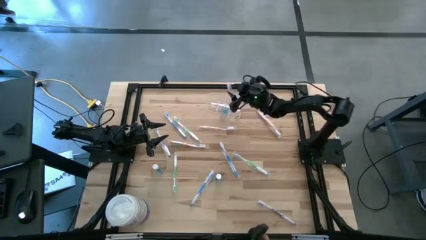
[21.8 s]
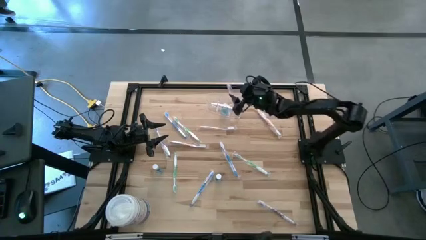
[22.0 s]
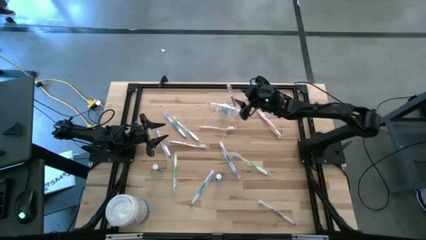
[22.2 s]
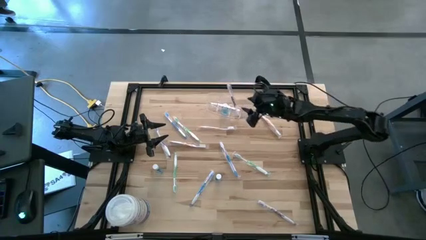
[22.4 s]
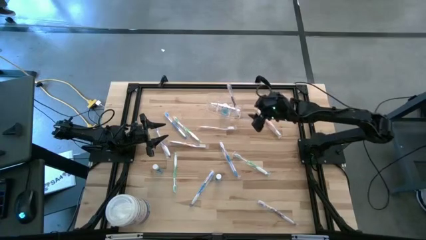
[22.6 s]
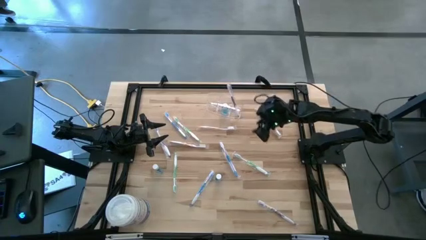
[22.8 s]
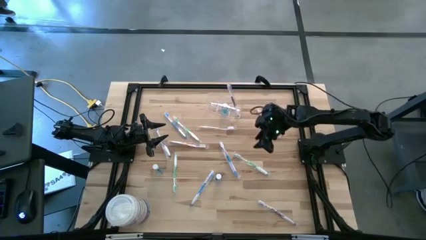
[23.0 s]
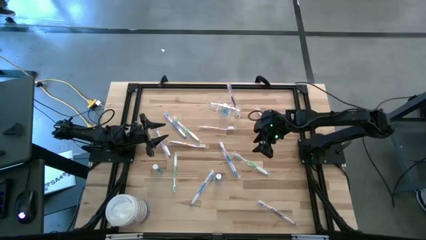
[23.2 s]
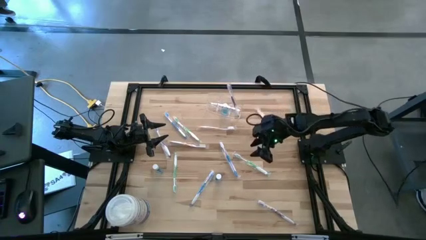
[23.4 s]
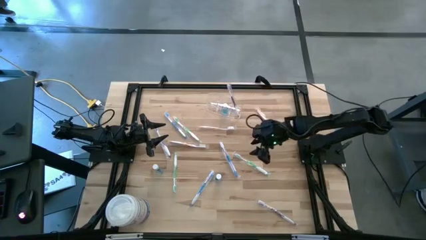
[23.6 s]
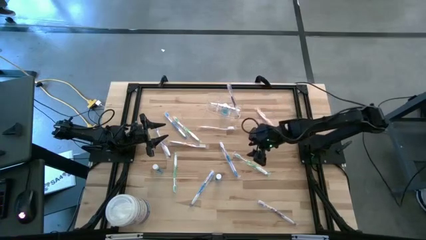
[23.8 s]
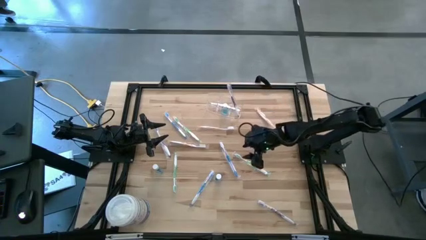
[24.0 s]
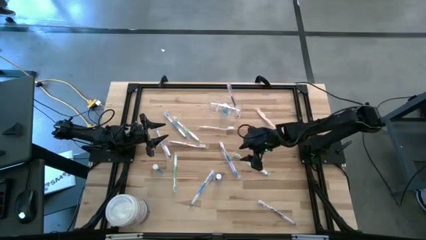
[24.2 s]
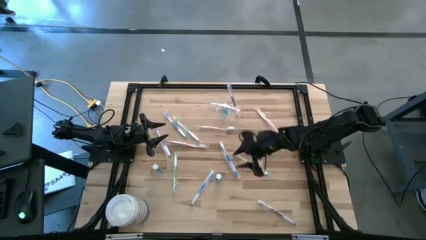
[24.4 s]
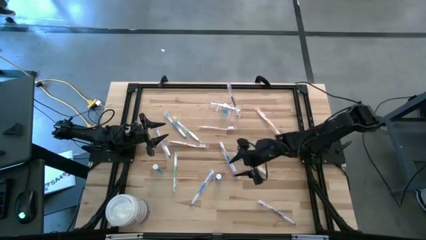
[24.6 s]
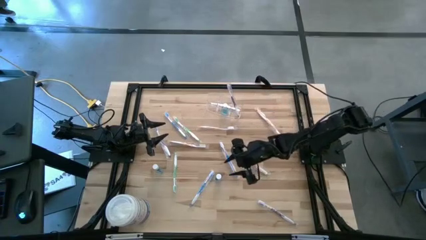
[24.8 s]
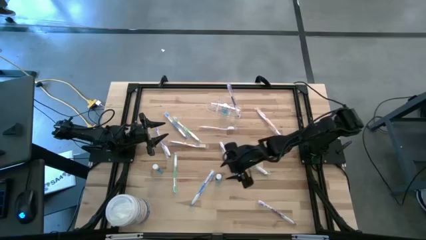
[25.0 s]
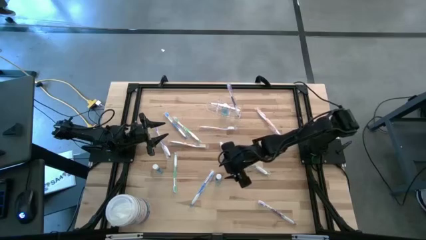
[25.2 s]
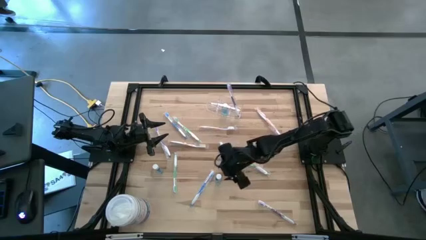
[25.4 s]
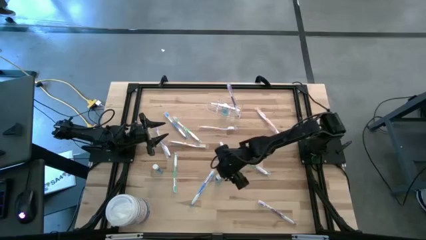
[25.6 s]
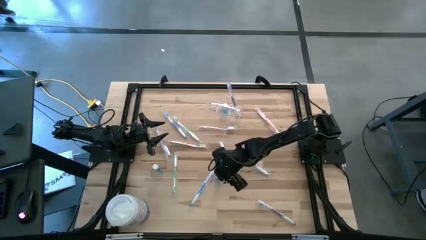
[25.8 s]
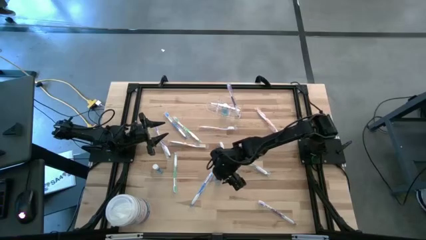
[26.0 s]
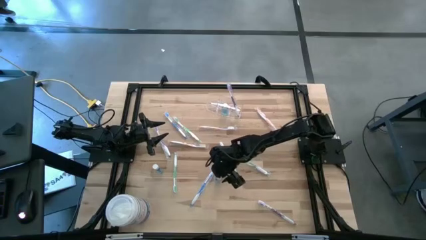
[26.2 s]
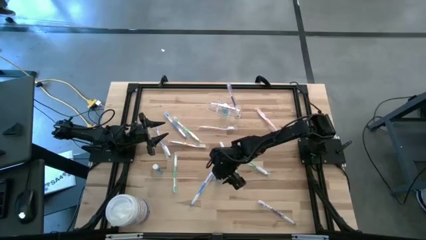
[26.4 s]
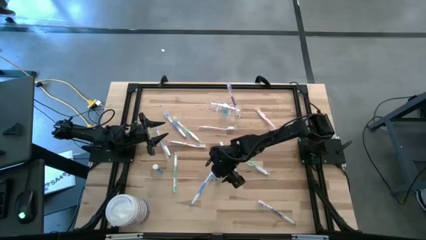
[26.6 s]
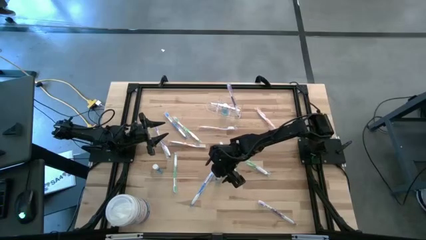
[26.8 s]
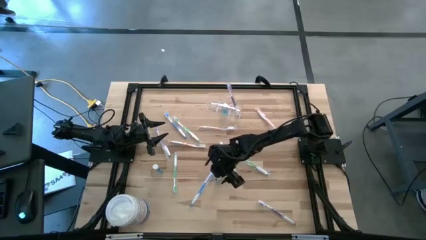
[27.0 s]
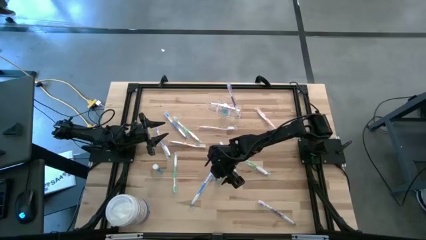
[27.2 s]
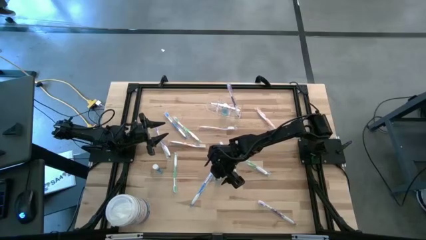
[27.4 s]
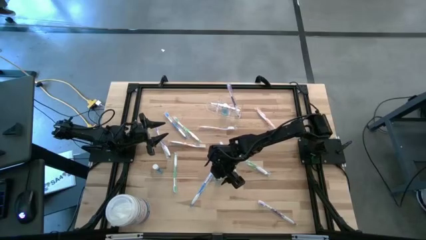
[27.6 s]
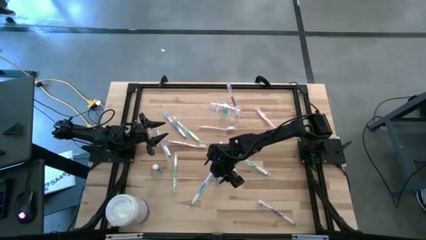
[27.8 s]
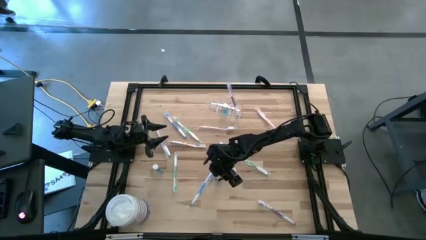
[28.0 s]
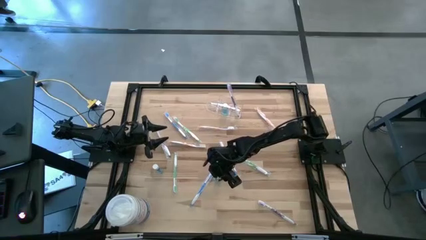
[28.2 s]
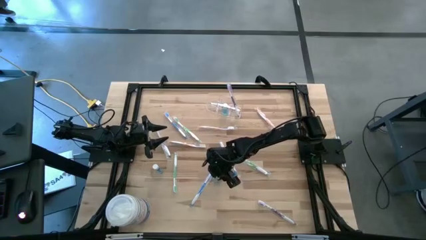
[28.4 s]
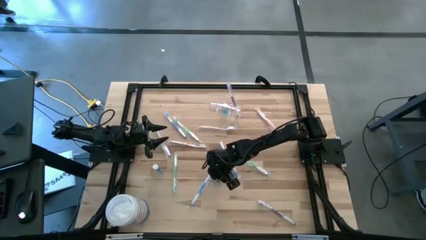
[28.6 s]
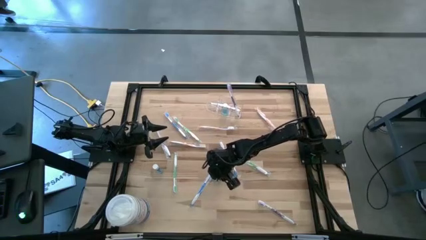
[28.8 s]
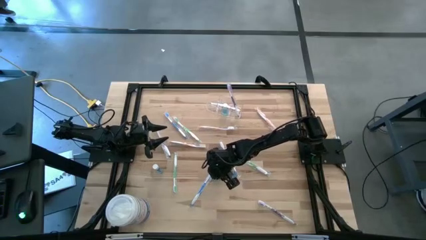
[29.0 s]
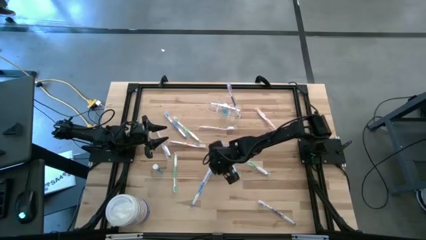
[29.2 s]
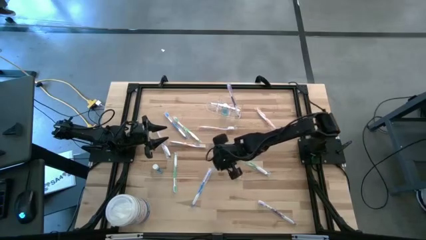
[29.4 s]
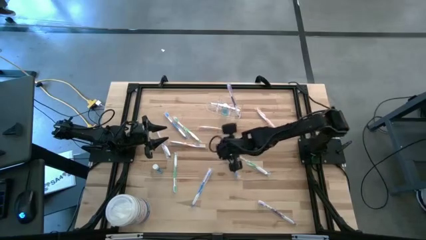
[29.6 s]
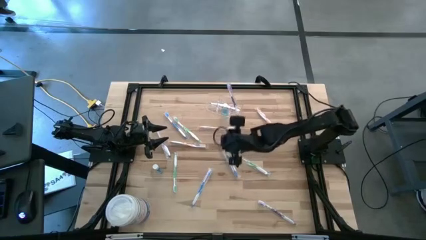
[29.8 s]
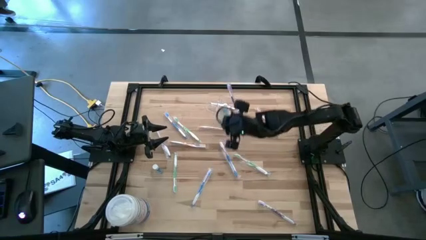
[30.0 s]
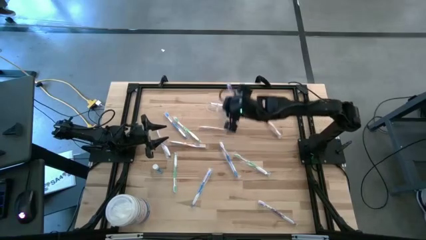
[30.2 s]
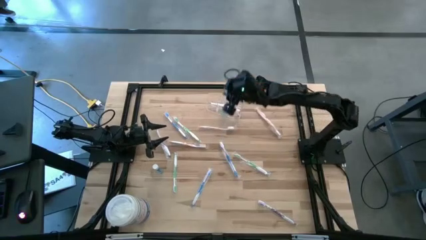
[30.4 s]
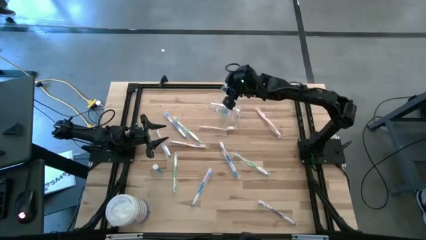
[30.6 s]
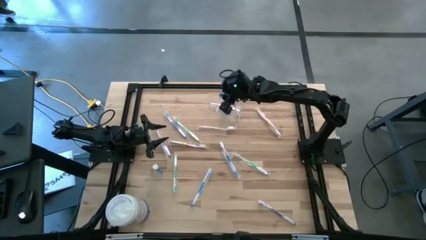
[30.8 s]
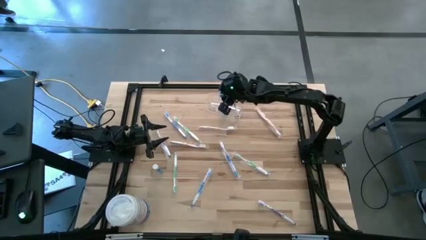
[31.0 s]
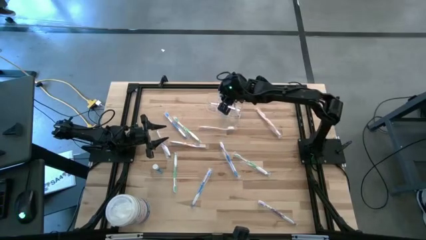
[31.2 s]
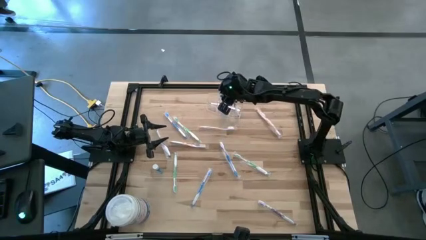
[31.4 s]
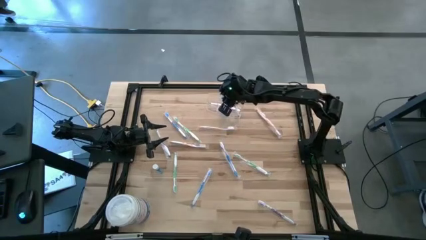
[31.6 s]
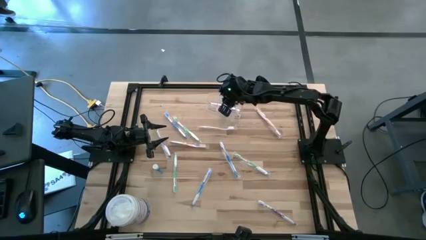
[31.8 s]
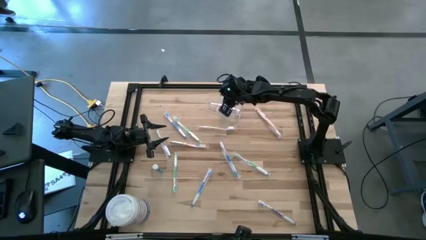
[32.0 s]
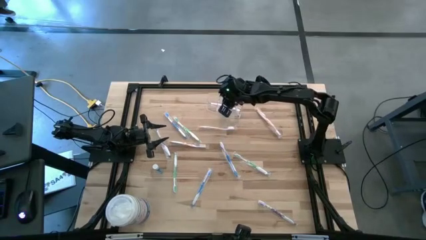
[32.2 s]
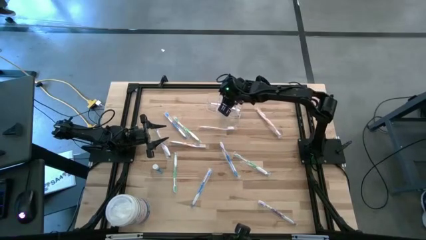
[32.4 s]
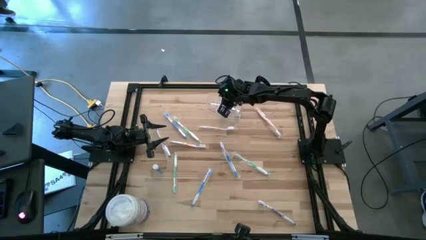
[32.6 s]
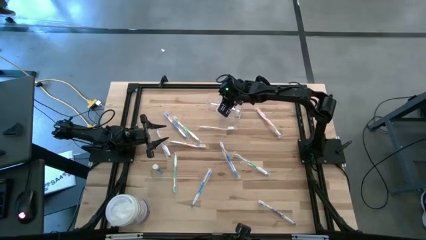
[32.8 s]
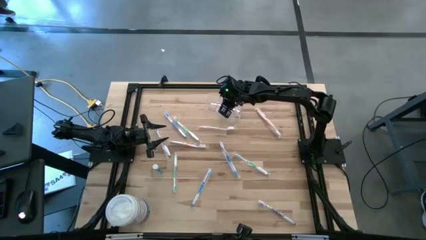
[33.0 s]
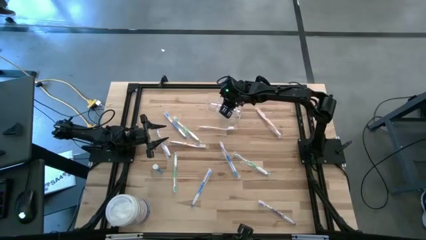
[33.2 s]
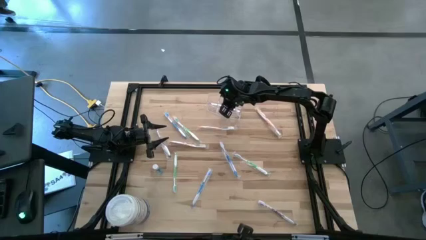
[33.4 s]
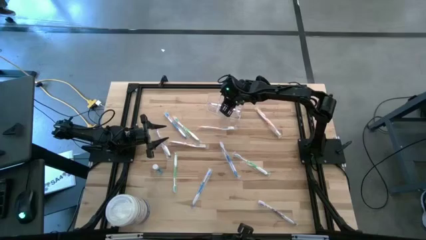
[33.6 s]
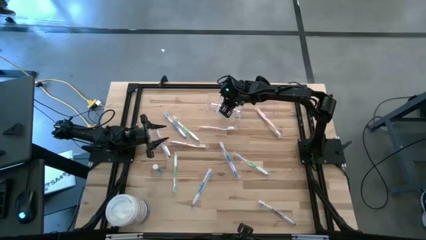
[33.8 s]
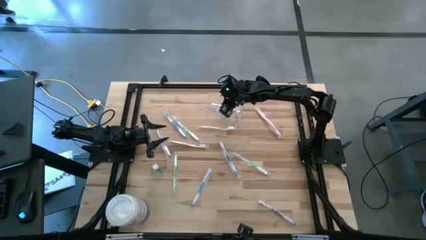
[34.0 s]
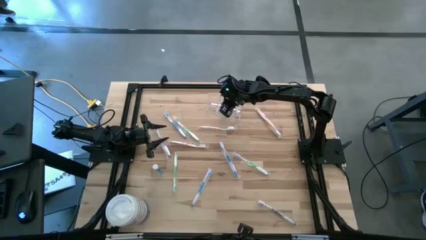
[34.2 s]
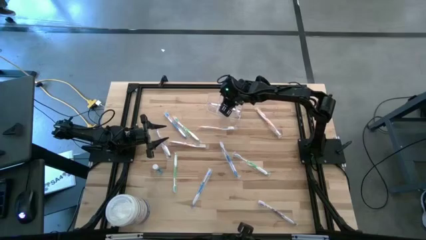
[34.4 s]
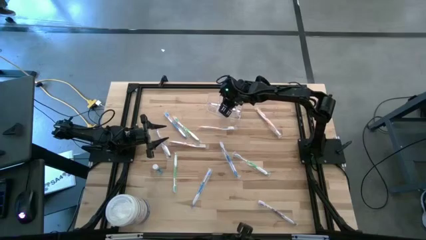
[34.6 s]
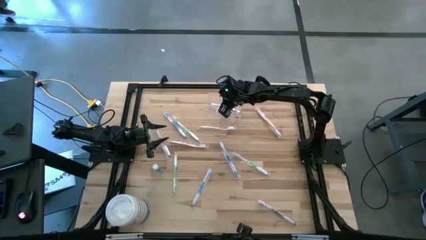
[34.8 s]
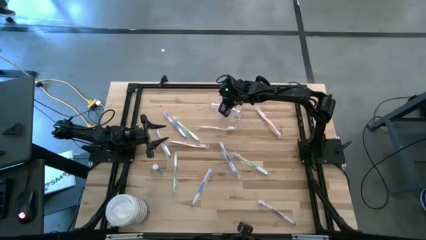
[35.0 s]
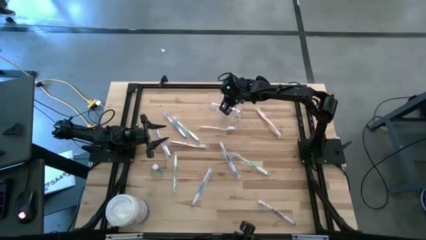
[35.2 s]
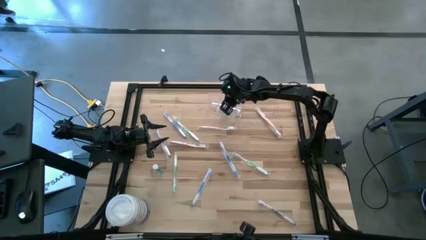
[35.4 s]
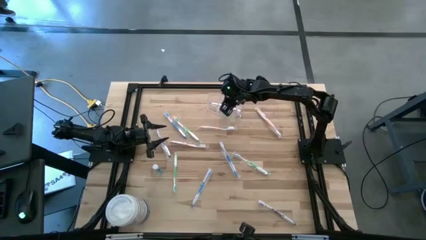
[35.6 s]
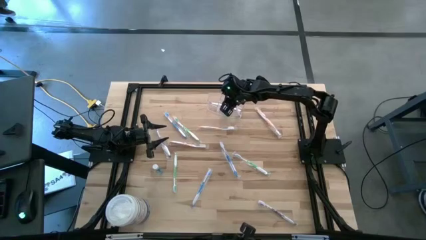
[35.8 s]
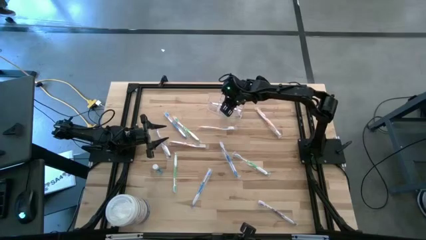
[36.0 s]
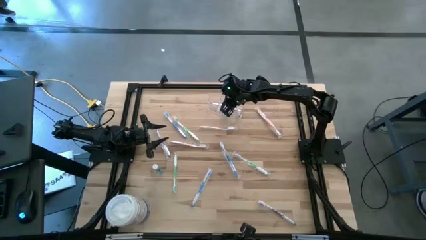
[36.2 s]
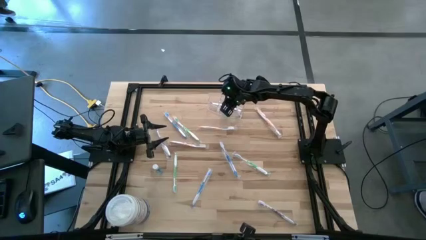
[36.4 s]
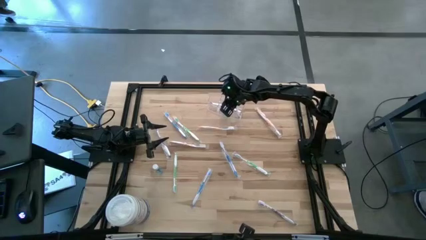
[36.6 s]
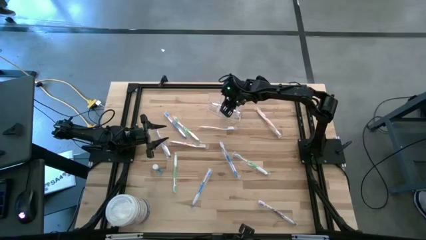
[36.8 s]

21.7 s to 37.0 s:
Task: Pick & Place toothbrushing station
Put the right blue mouthwash into the transparent organizer

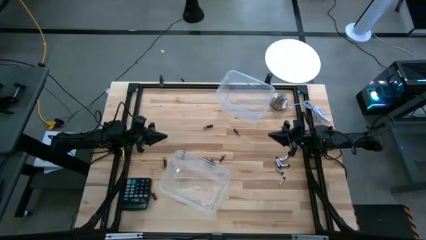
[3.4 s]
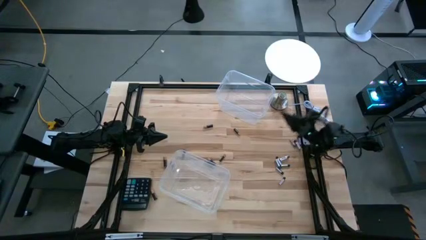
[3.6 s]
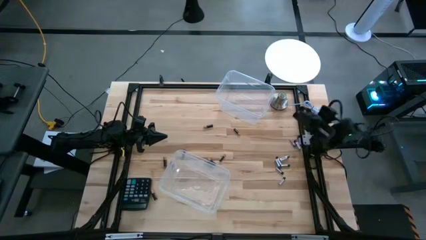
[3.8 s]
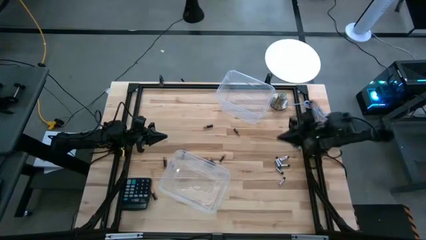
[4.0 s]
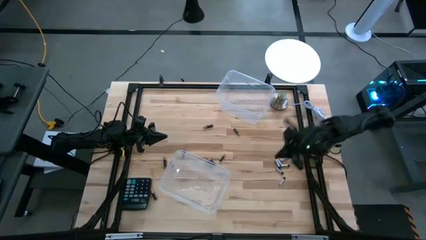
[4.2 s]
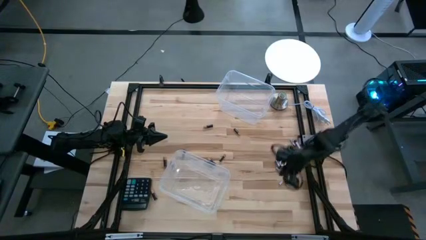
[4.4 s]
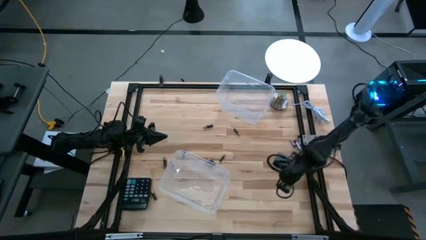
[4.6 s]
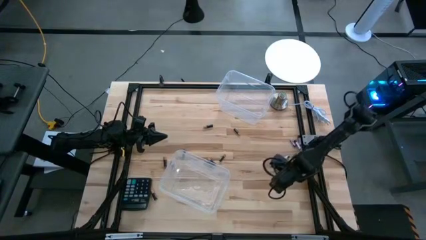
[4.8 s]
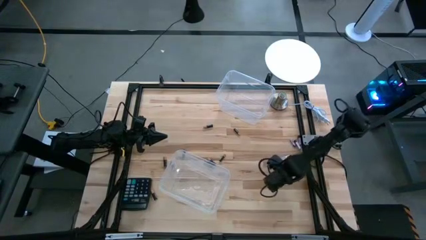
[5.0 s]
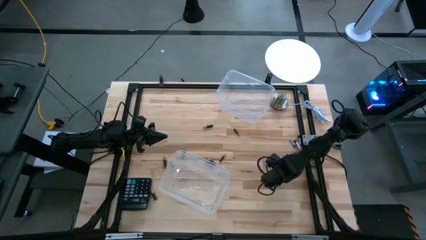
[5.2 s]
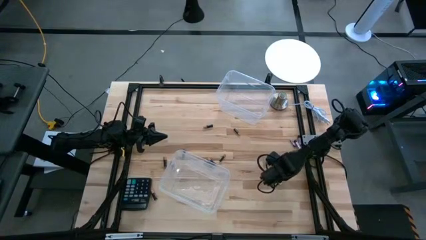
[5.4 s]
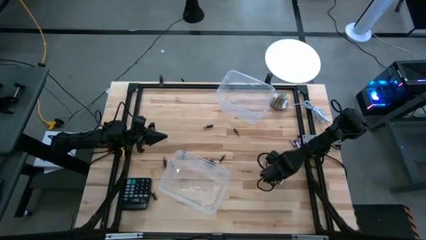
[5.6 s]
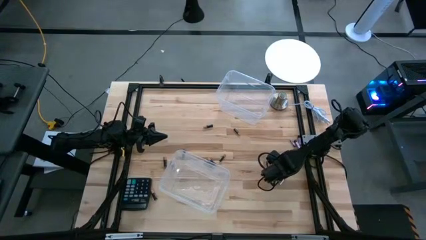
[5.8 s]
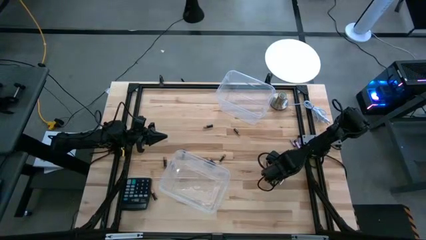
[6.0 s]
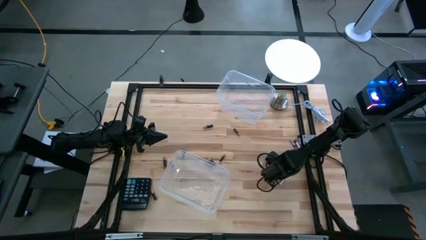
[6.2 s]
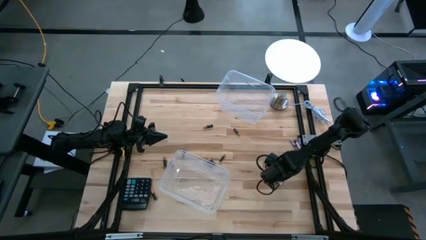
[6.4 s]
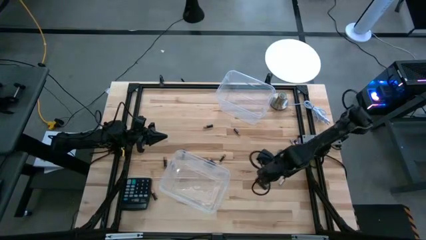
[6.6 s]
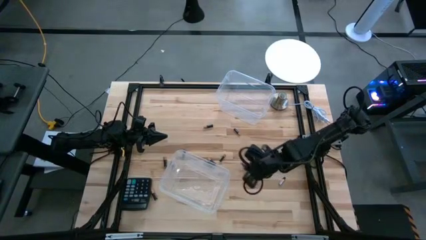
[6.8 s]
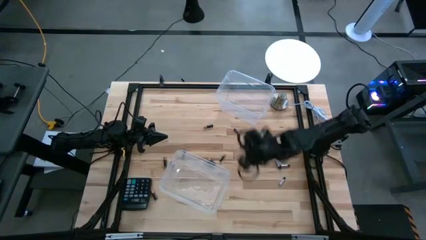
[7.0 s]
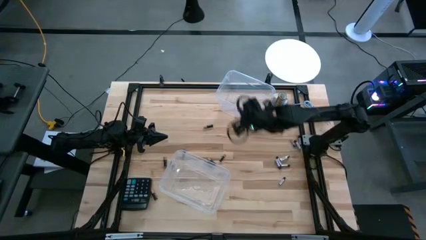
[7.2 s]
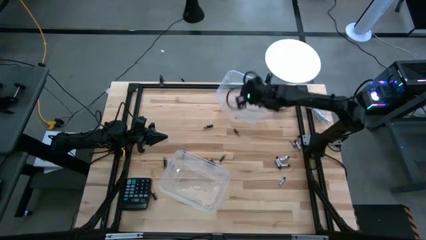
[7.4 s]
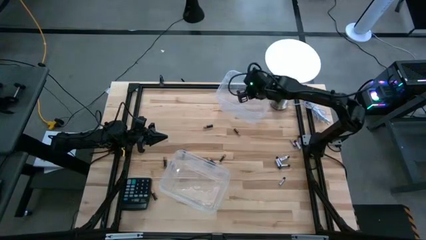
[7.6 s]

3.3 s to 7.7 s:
Task: Sort batteries
Put the silver battery into the top transparent bin
